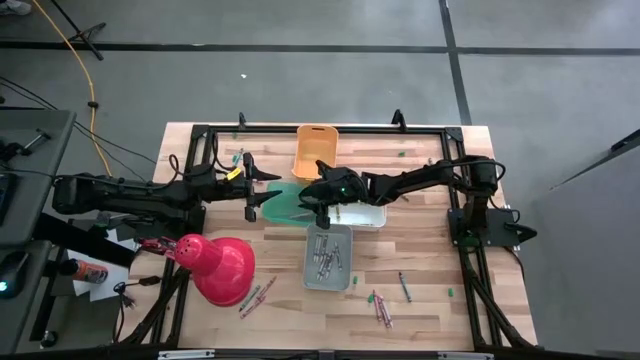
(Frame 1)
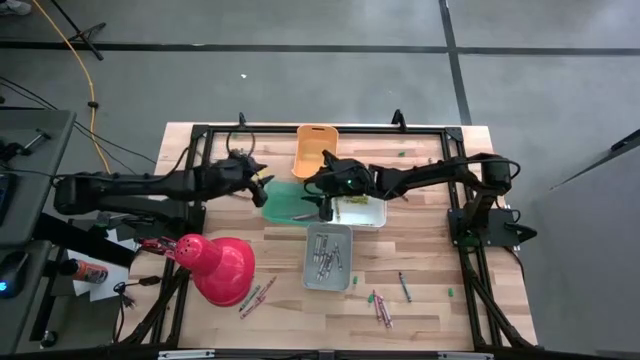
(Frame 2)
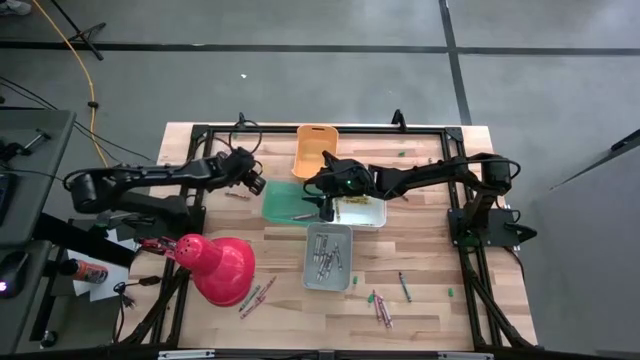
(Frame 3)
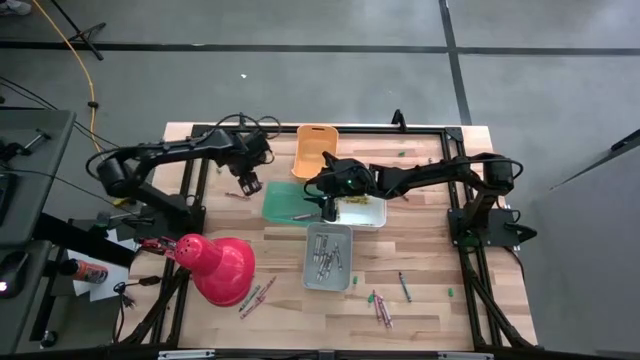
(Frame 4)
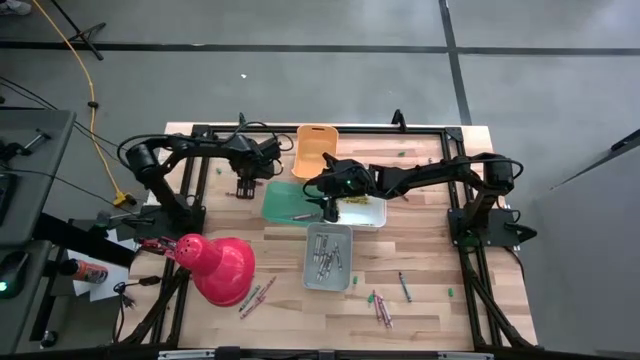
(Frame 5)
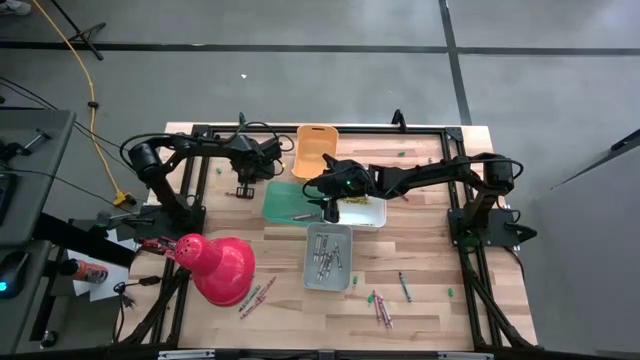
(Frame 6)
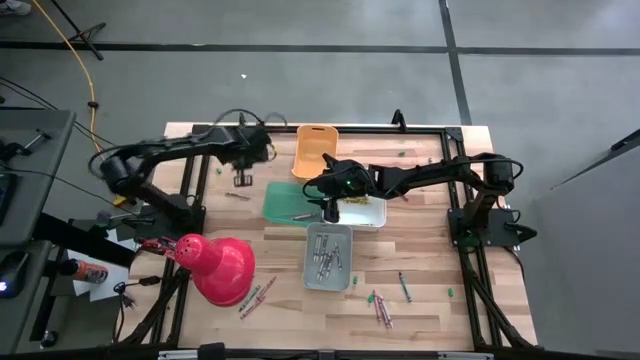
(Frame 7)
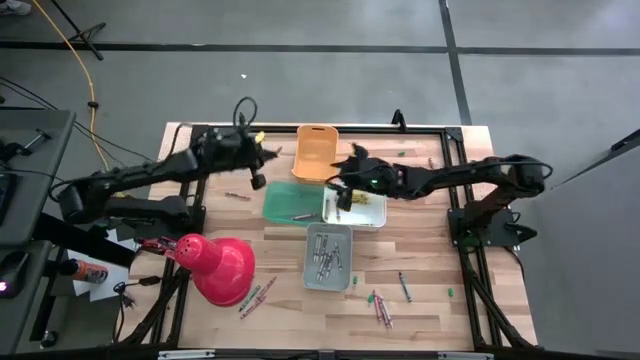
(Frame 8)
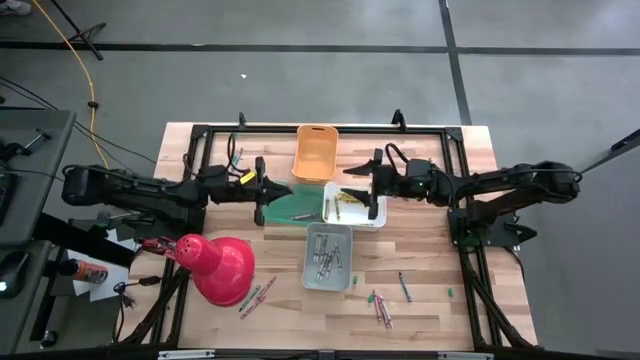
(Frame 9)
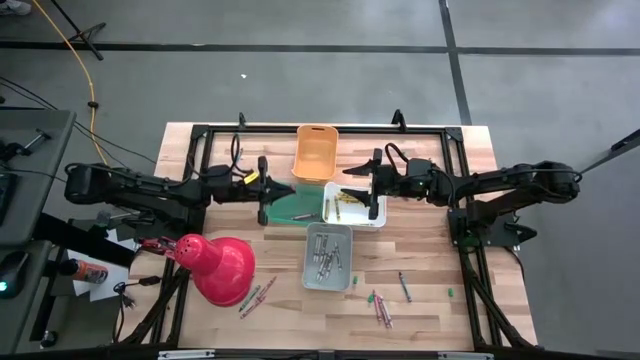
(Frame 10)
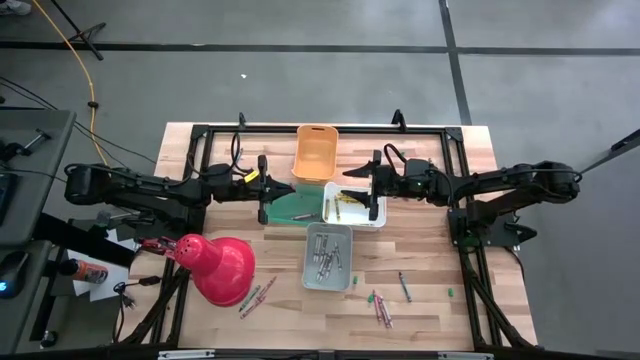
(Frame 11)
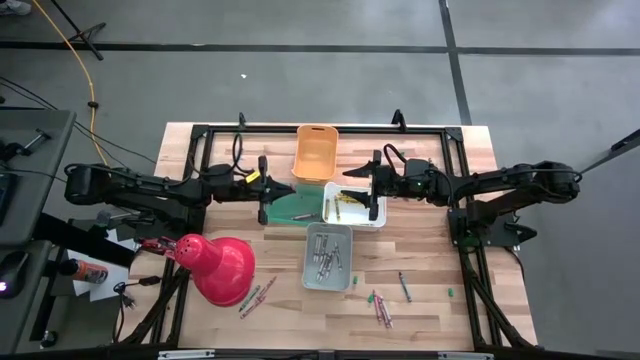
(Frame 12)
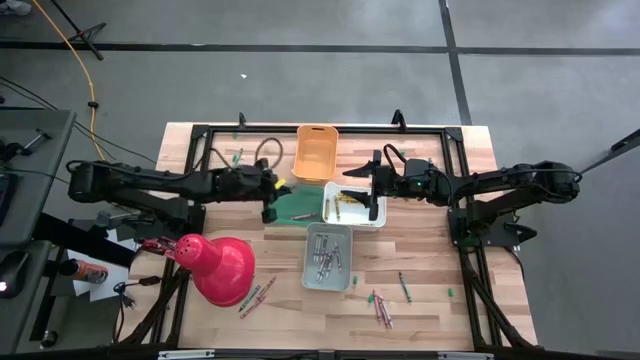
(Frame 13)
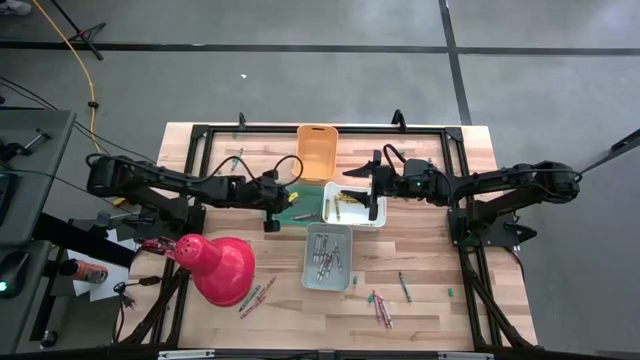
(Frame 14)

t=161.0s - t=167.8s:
Task: Sort crayons
Put the pink crayon into the blue bin

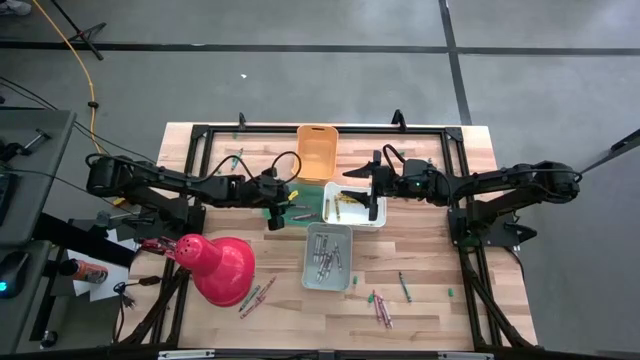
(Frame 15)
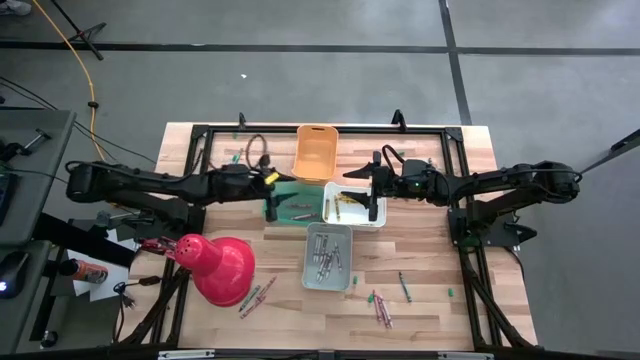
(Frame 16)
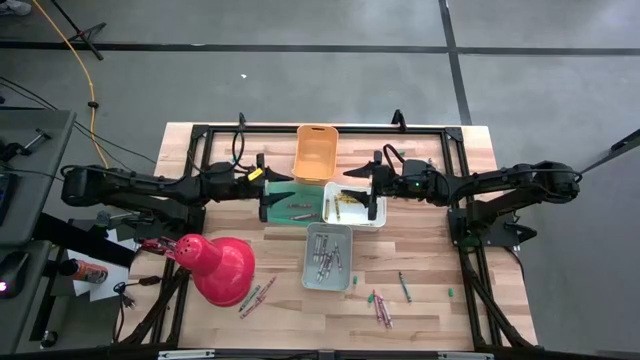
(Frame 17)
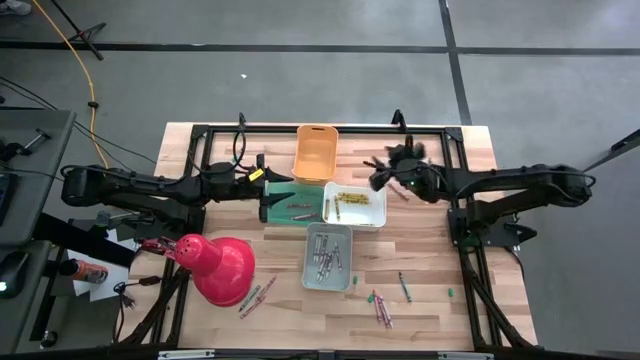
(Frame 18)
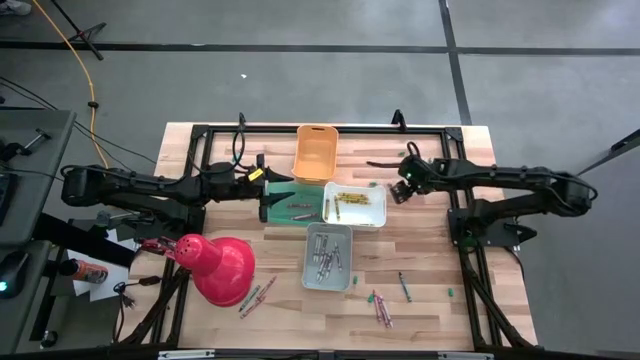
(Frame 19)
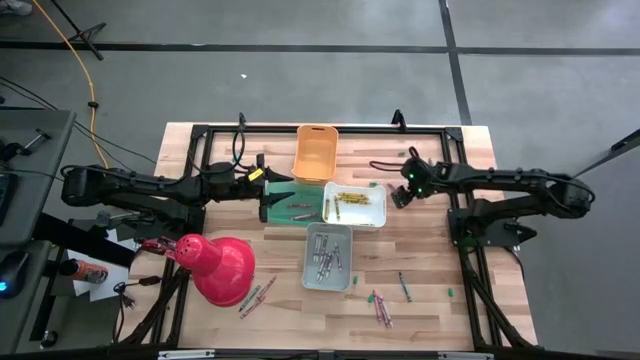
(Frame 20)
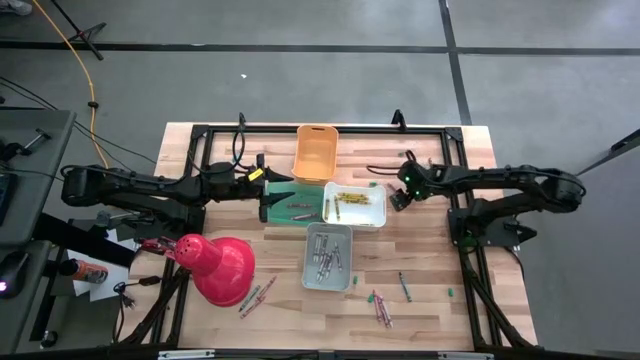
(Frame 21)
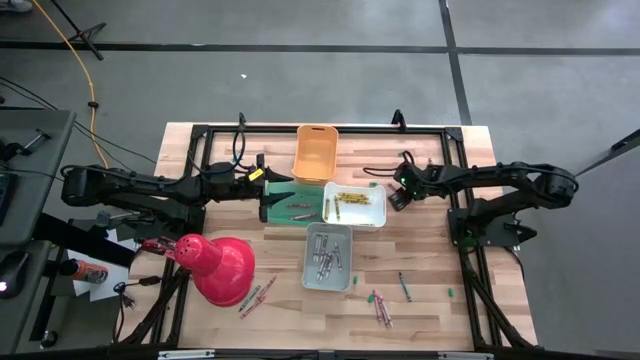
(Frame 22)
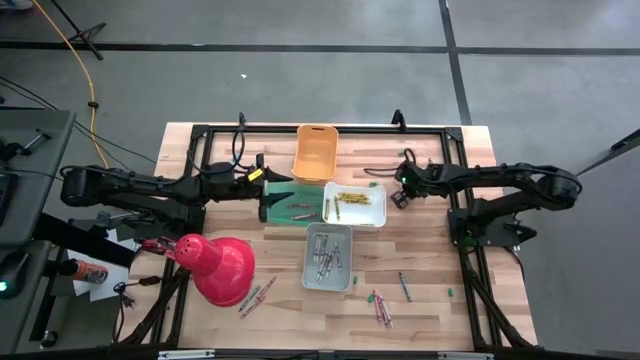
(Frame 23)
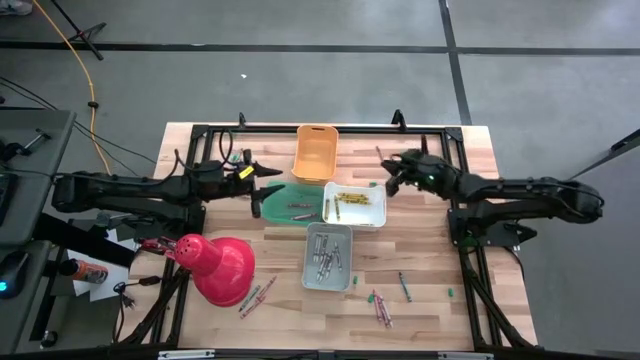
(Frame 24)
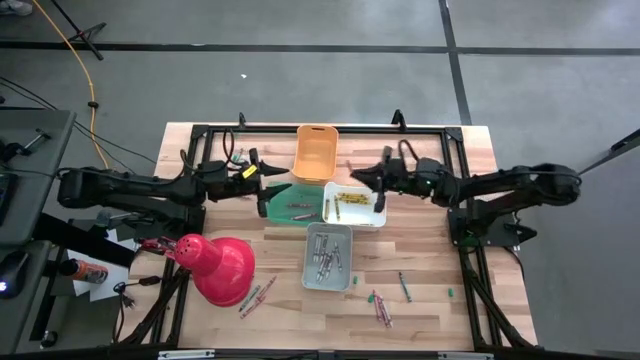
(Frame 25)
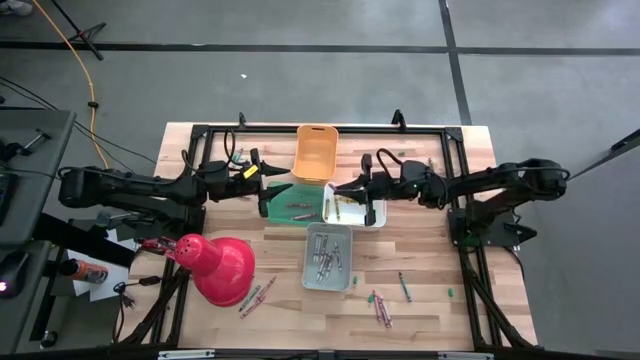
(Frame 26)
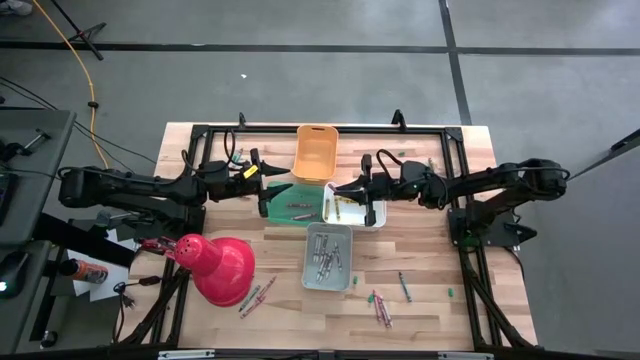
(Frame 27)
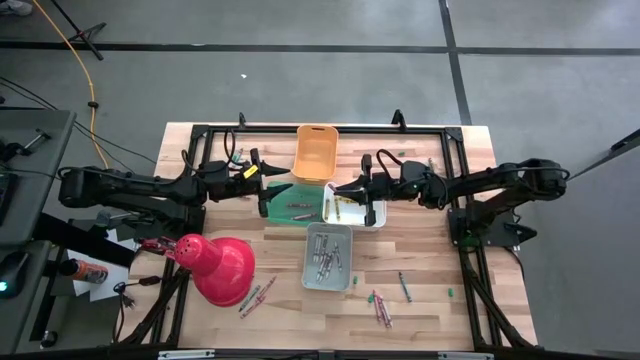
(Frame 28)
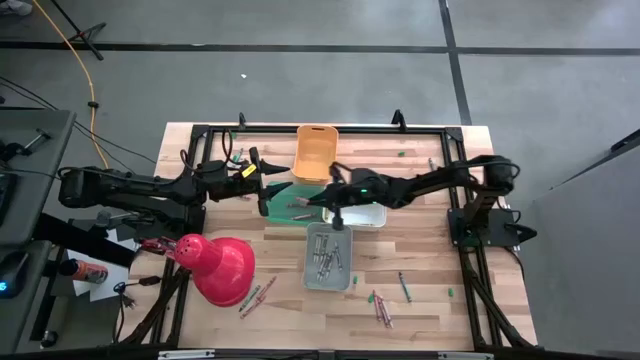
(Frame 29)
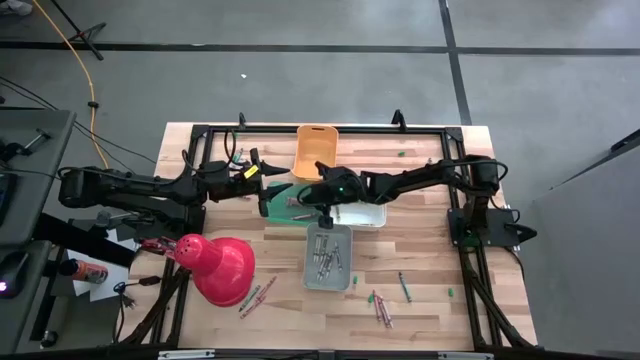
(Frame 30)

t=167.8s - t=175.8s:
Put the pink crayon into the blue bin

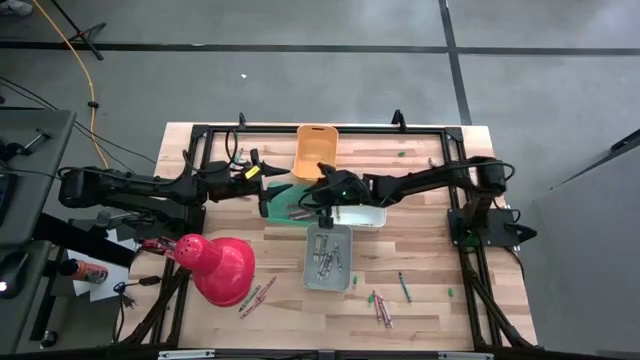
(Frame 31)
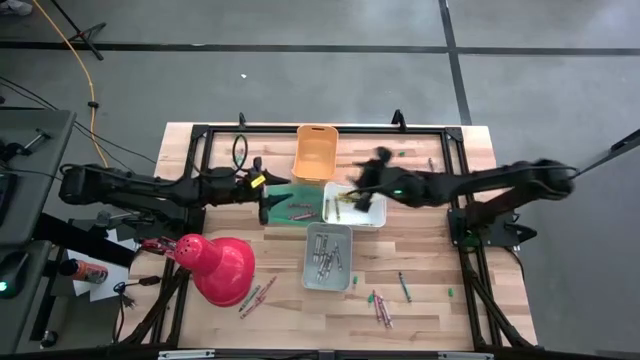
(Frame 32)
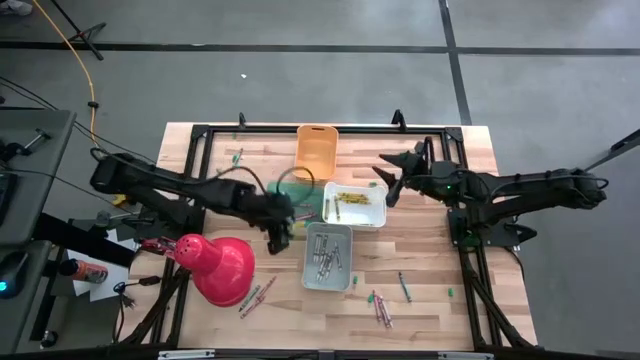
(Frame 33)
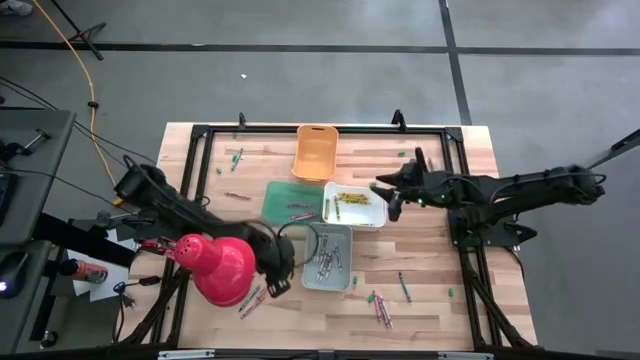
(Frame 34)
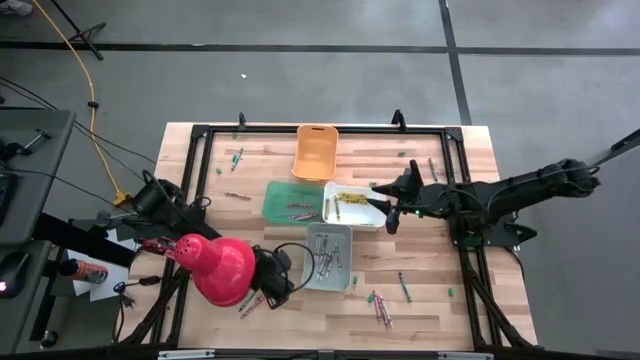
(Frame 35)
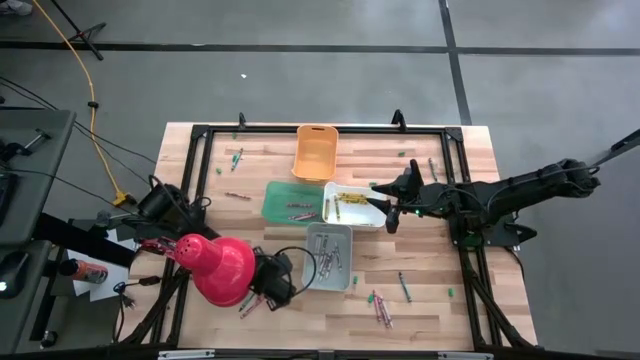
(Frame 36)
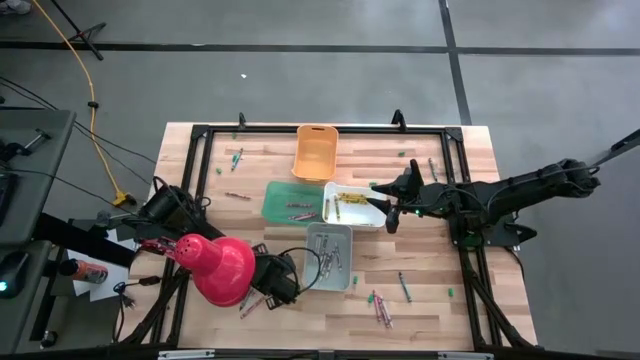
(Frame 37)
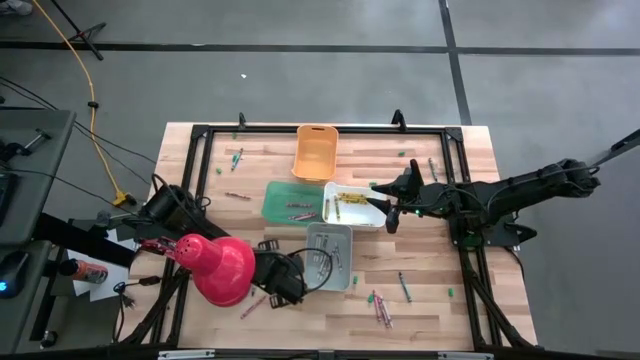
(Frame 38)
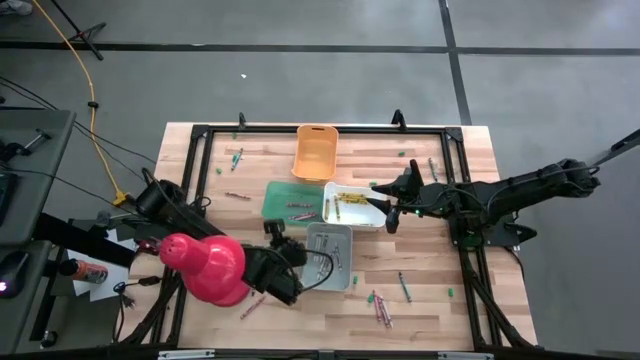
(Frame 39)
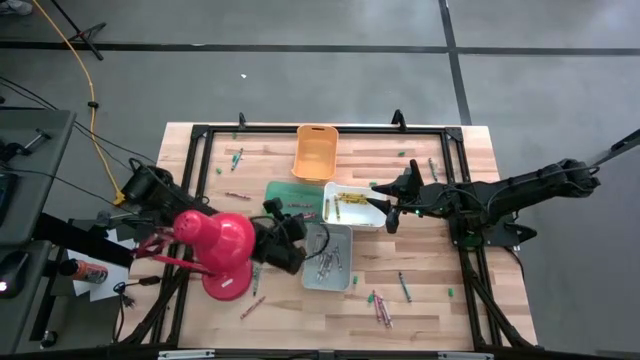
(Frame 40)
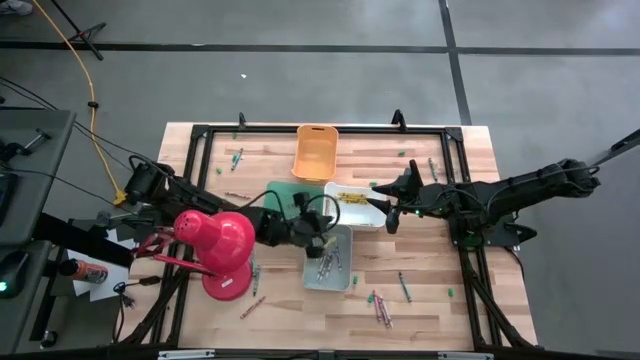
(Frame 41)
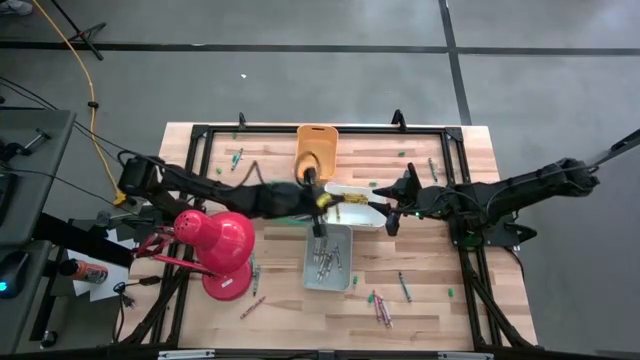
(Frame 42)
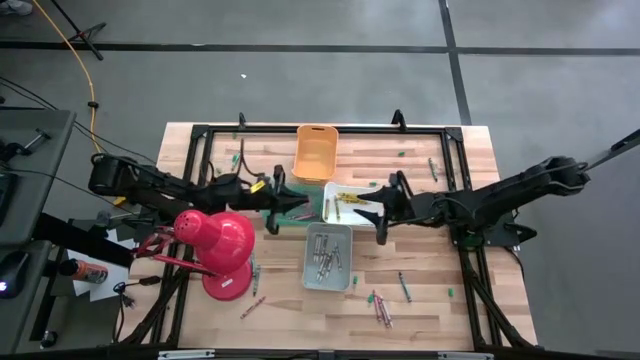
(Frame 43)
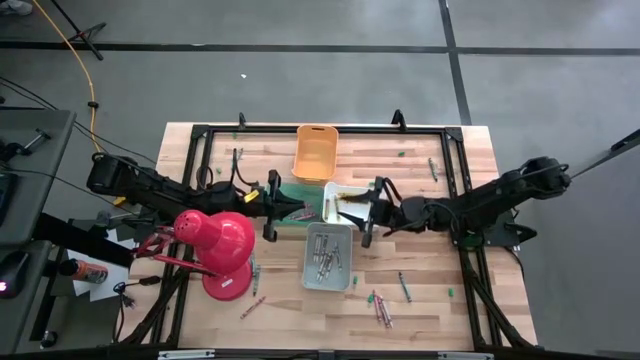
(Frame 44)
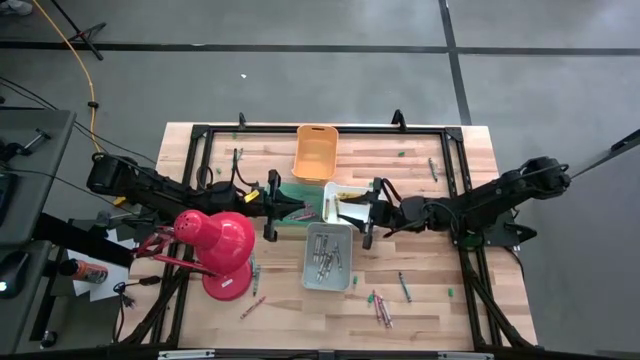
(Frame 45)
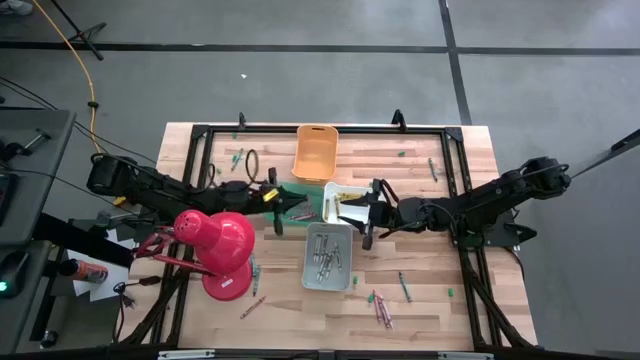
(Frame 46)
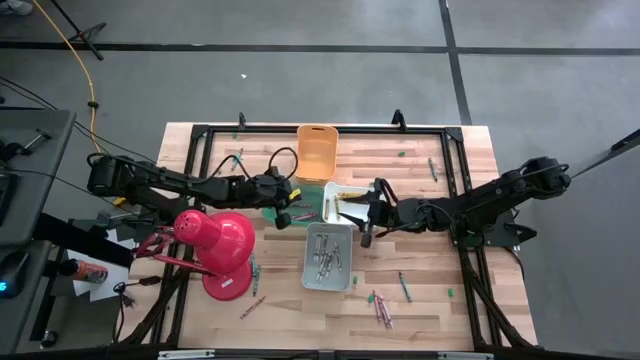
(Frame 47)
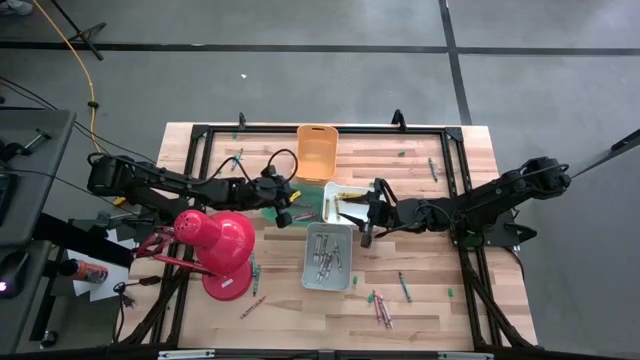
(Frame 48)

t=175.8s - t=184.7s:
Put the pink crayon into the blue bin
